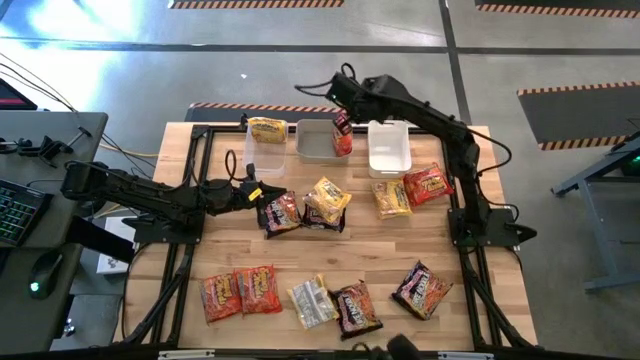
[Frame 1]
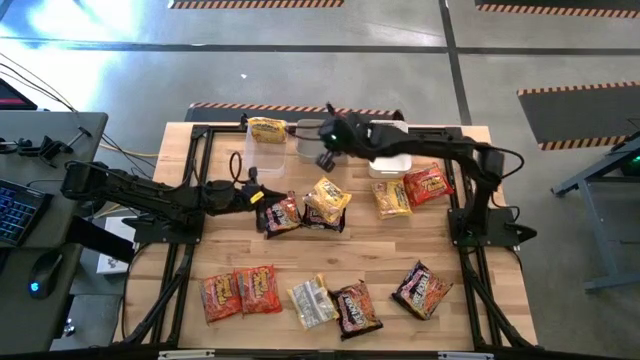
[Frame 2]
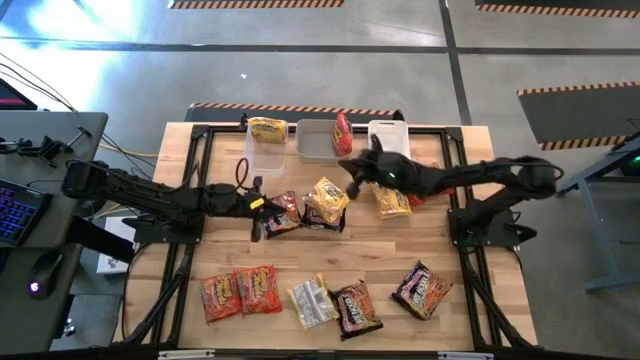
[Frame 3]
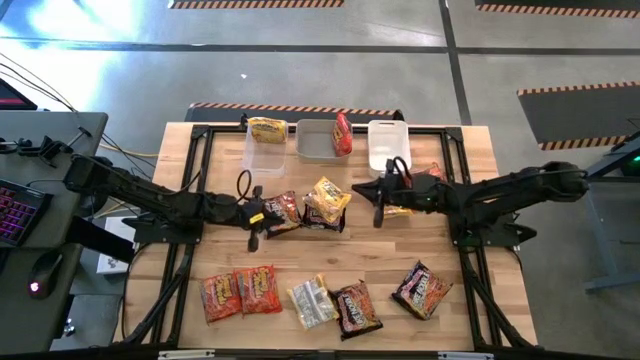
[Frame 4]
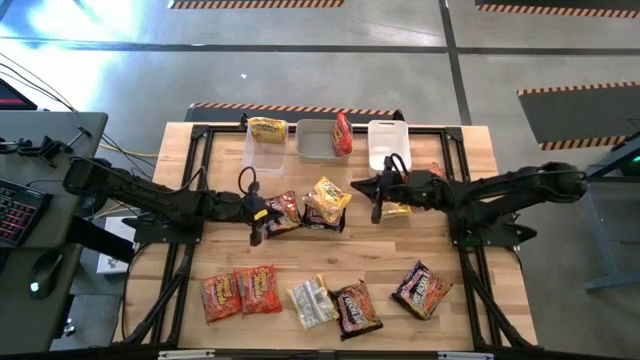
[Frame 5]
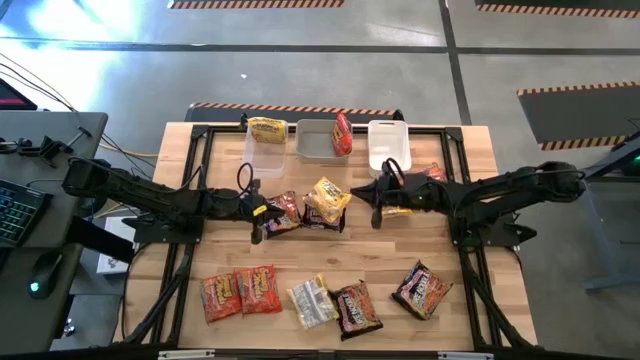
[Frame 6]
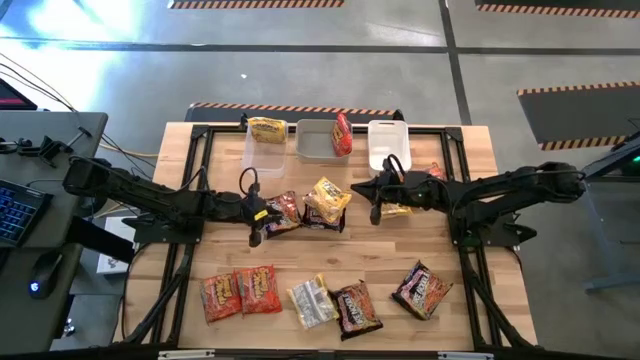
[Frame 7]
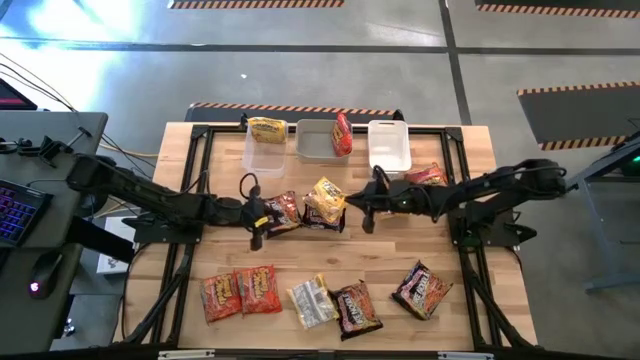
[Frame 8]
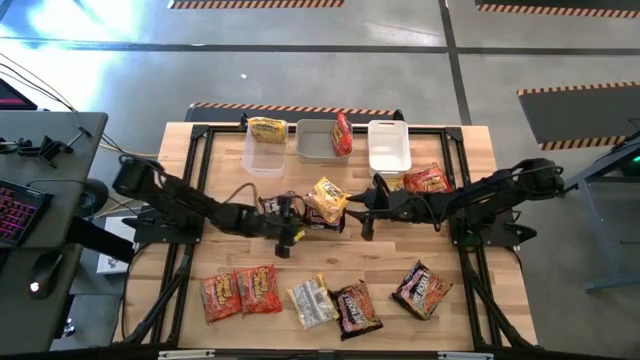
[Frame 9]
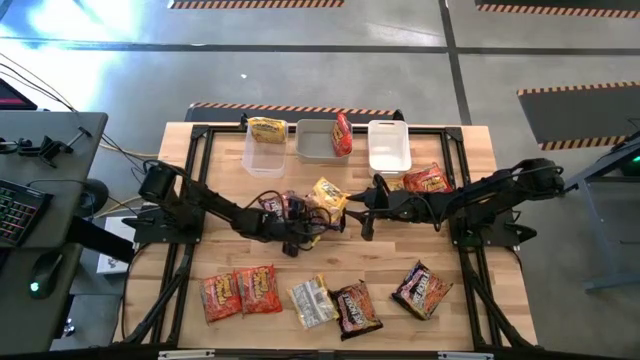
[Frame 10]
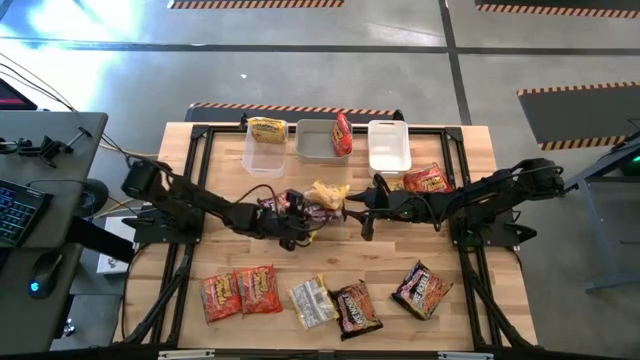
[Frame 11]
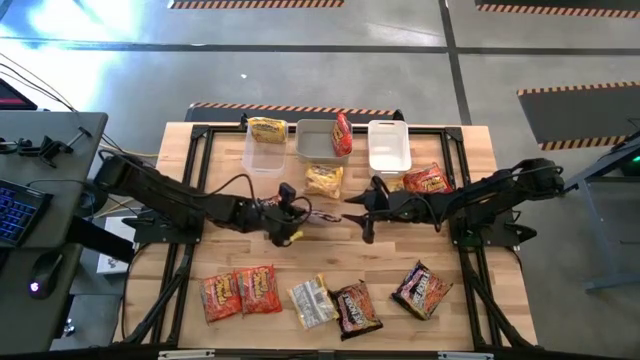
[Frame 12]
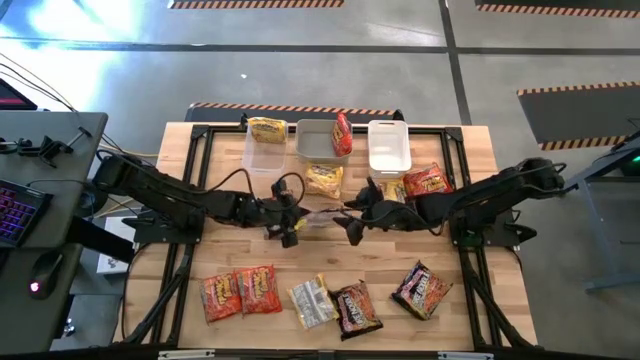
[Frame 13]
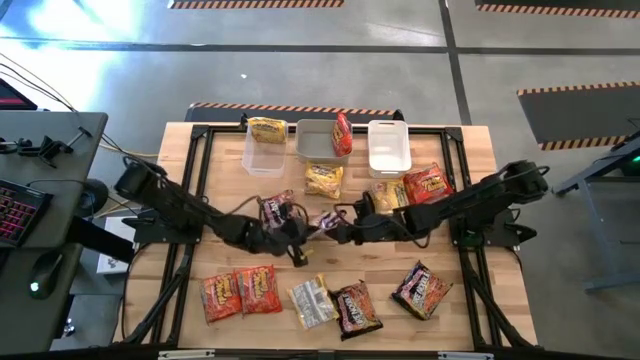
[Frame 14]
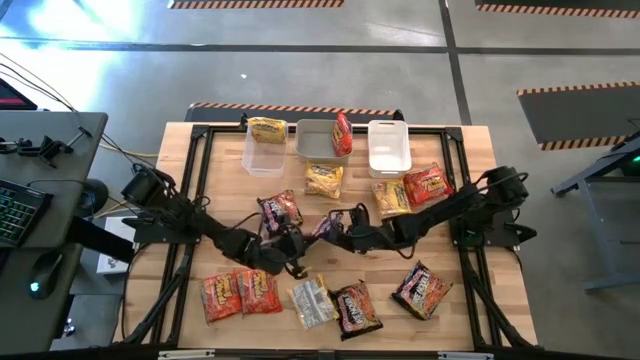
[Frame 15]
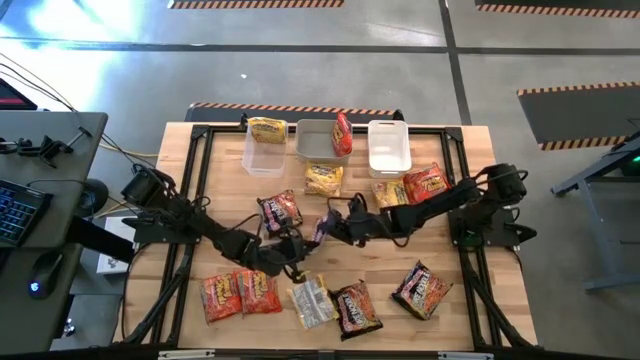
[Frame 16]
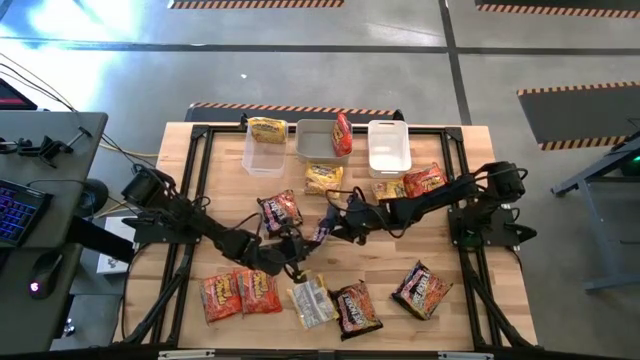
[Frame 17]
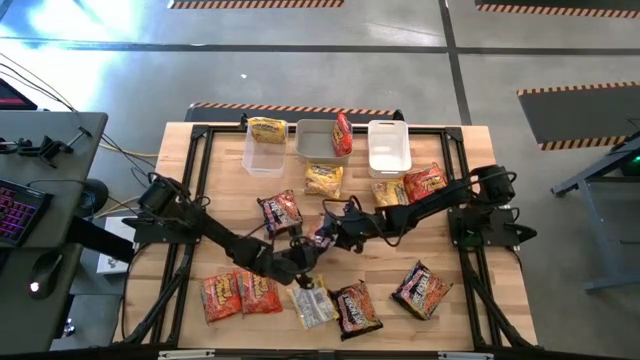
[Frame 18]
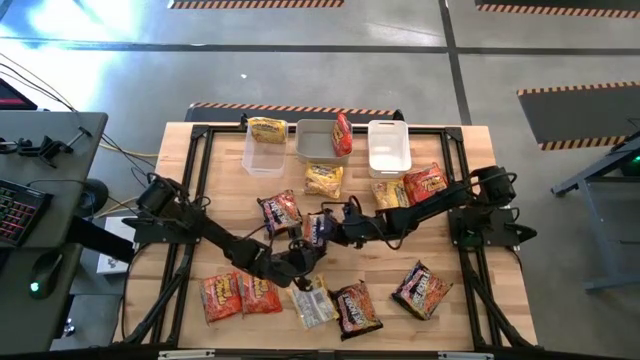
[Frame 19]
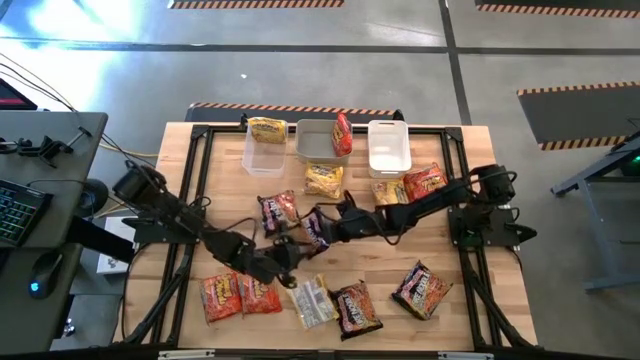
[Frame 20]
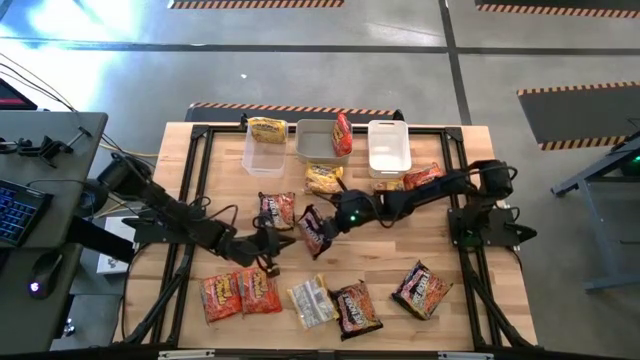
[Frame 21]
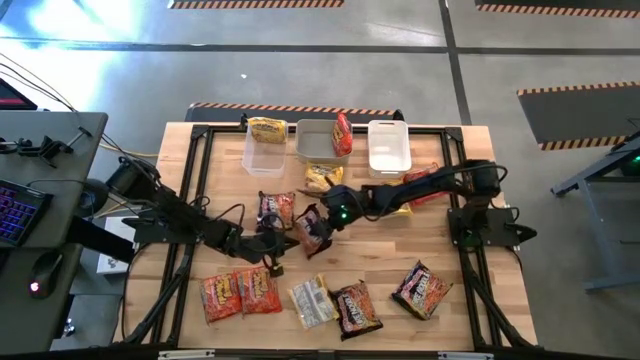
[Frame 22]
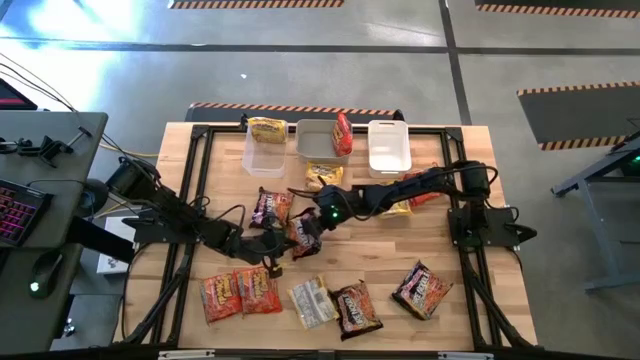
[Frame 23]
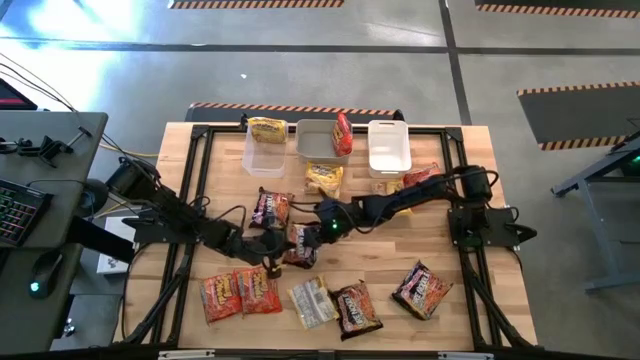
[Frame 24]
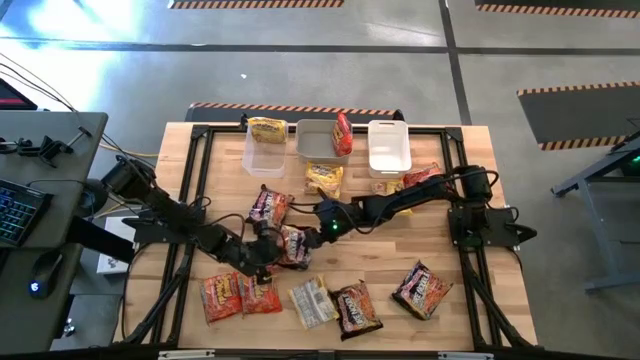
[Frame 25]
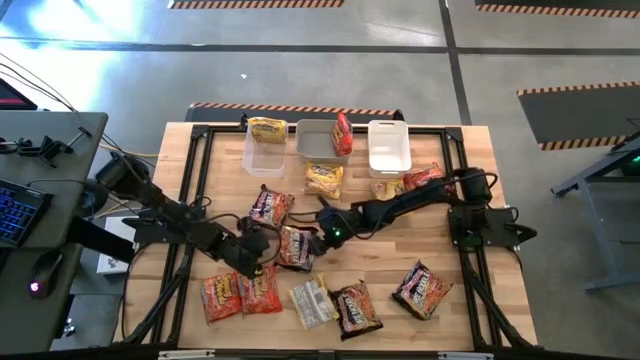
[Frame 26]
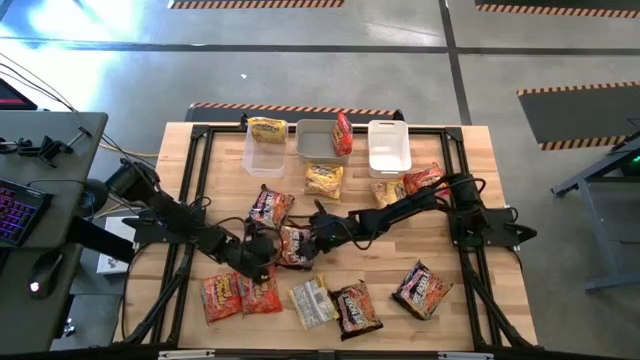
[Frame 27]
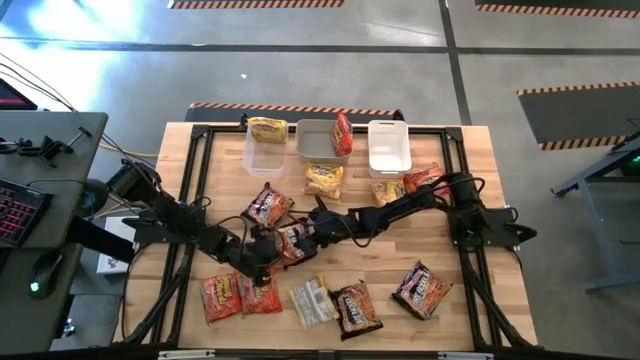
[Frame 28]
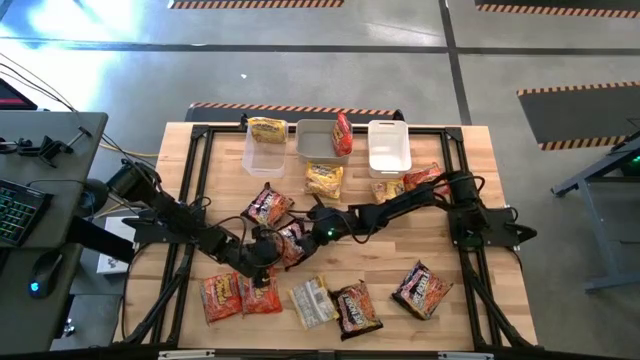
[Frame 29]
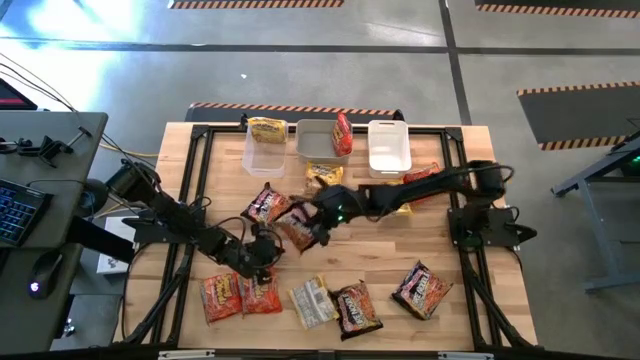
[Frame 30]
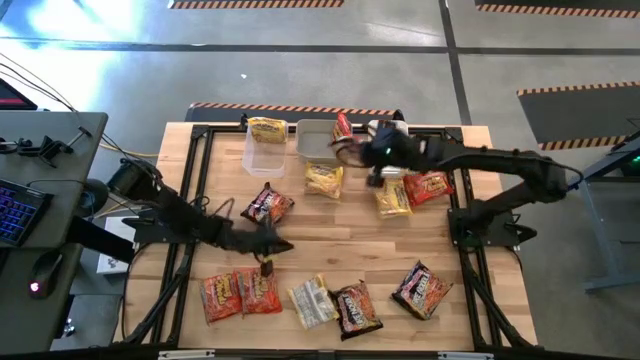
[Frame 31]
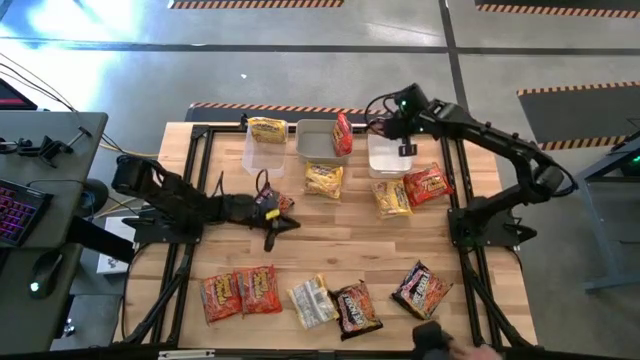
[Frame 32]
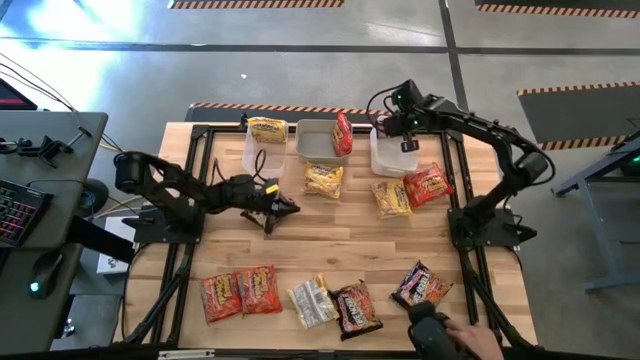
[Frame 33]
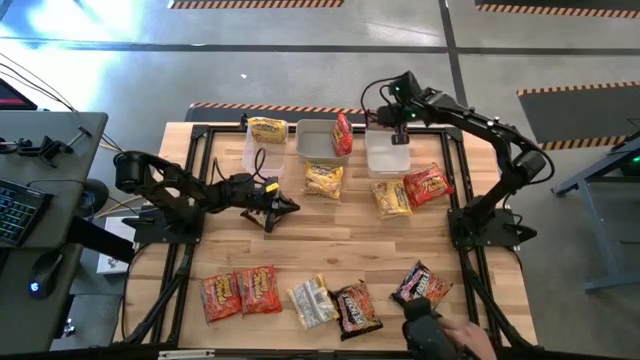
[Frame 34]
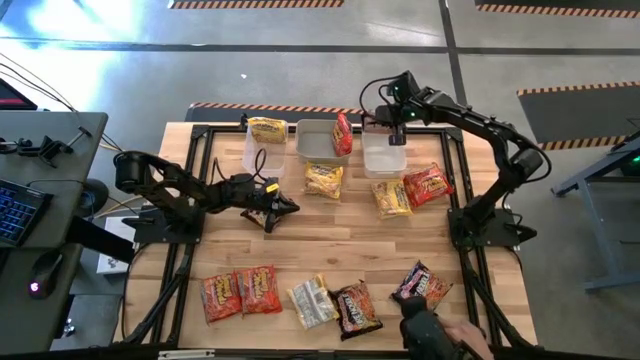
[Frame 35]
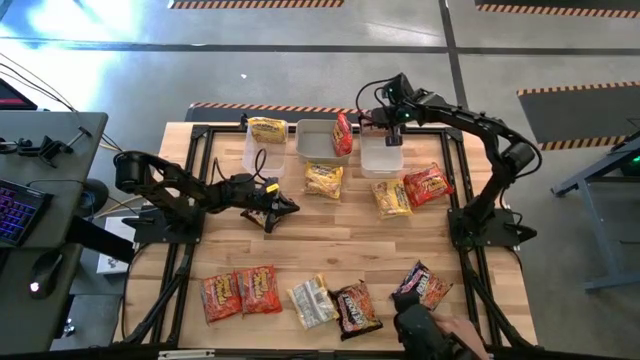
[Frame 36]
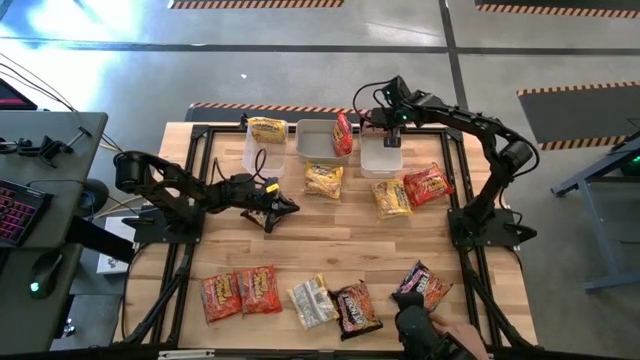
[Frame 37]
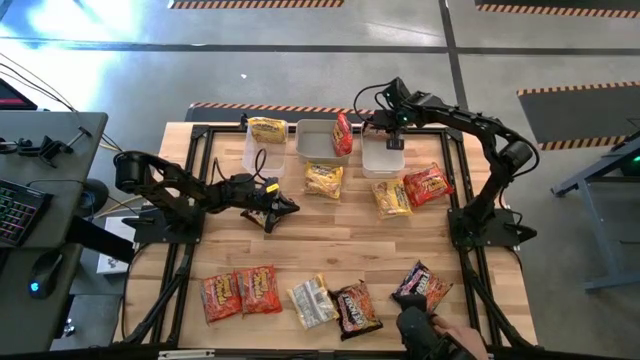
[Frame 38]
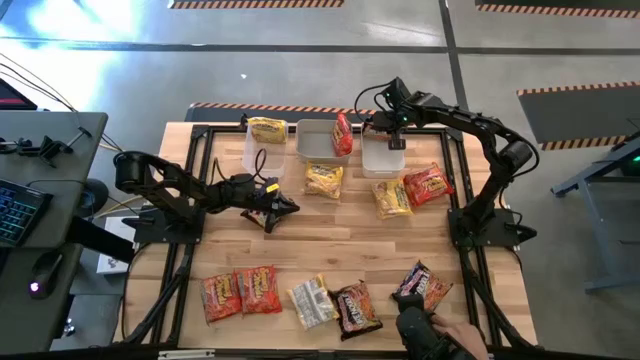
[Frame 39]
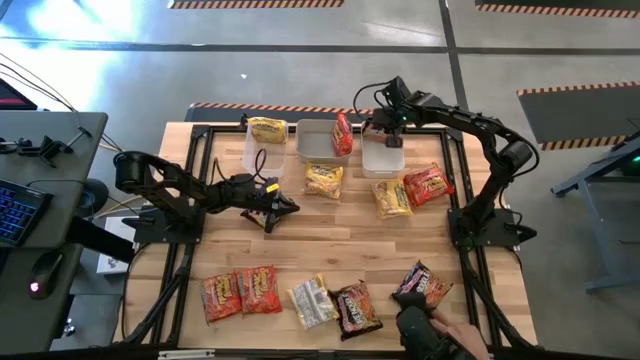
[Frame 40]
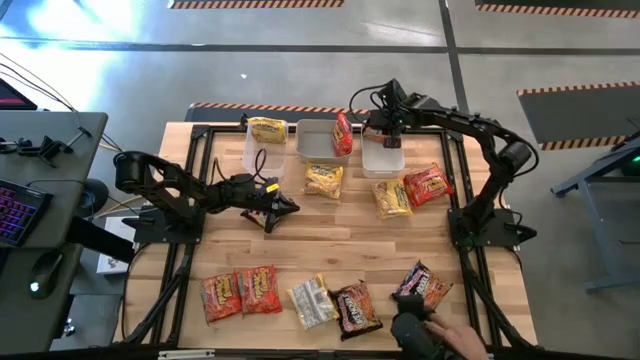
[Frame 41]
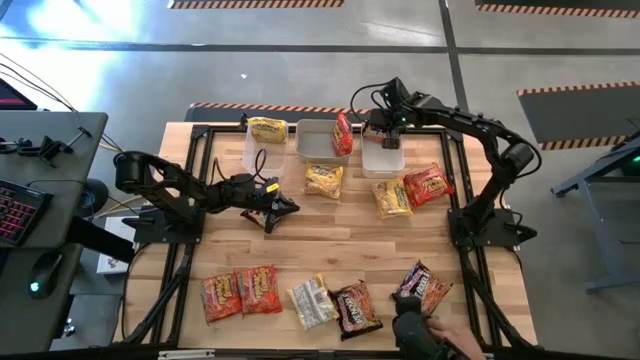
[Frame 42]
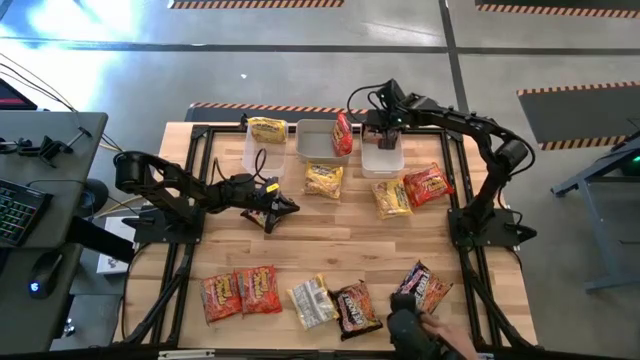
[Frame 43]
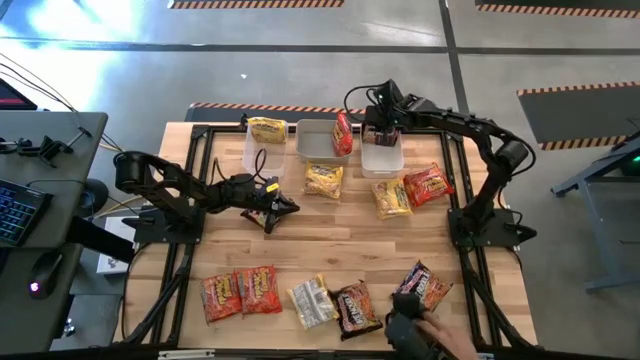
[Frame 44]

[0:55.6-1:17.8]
Task: Sort Maruchan noodles
Put the black noodle pack into the white bin
